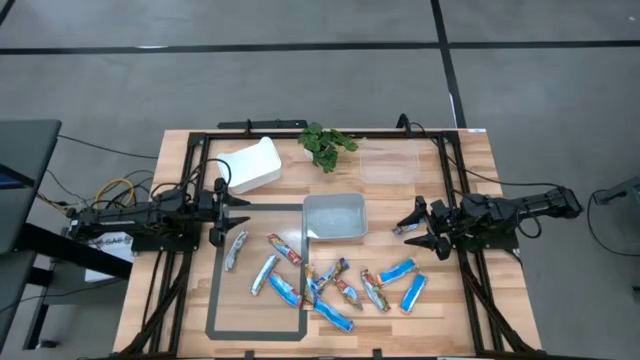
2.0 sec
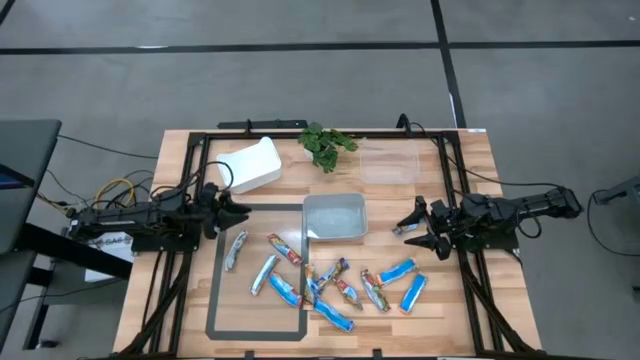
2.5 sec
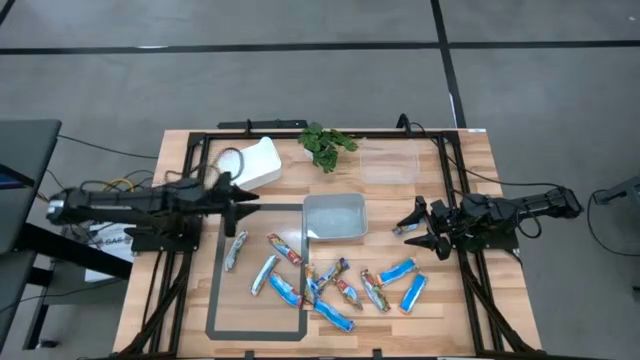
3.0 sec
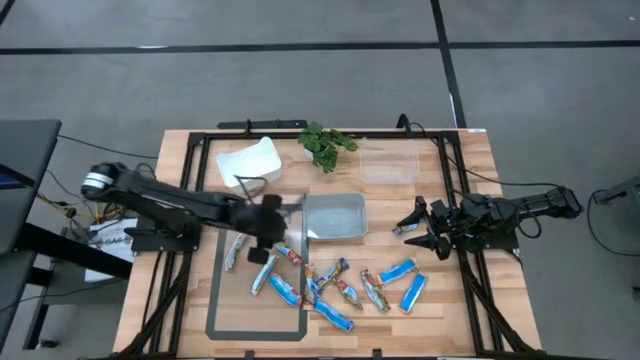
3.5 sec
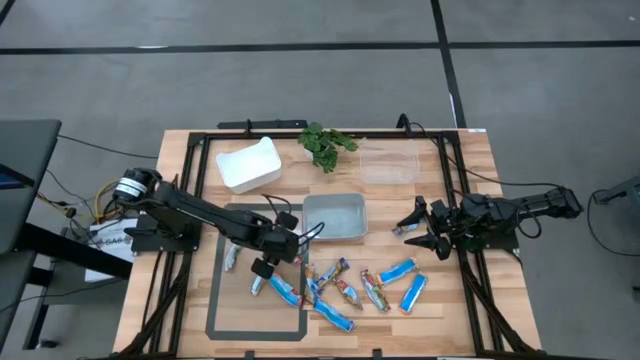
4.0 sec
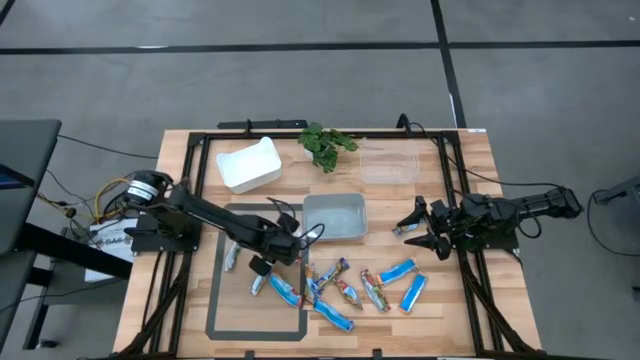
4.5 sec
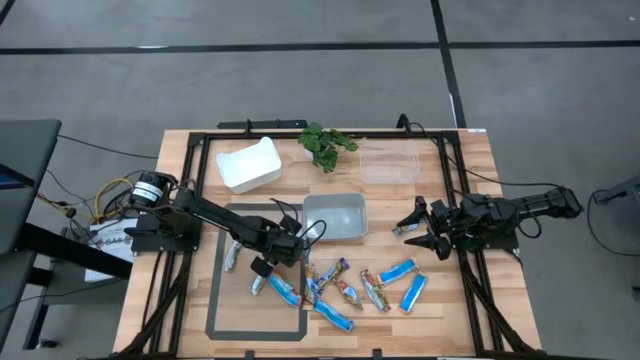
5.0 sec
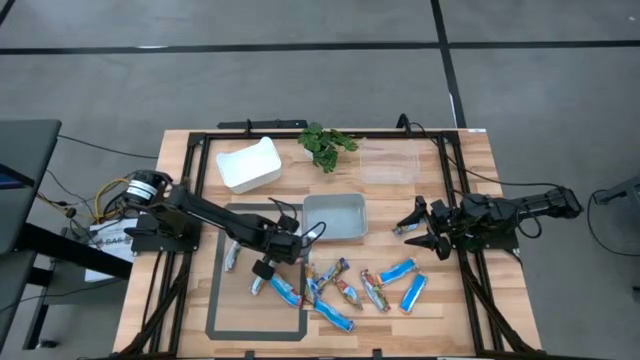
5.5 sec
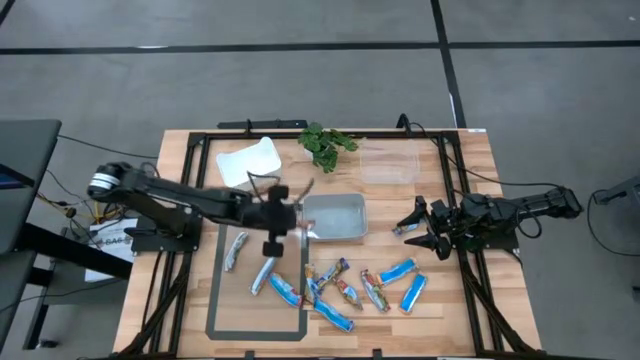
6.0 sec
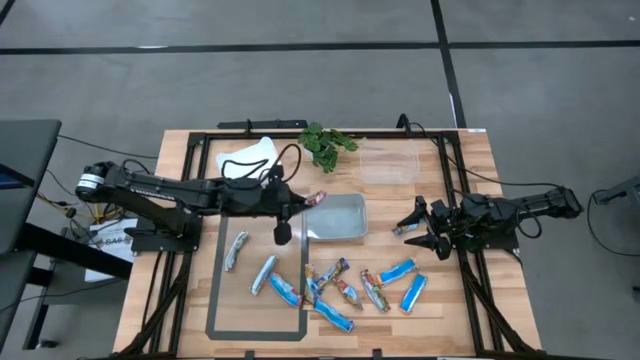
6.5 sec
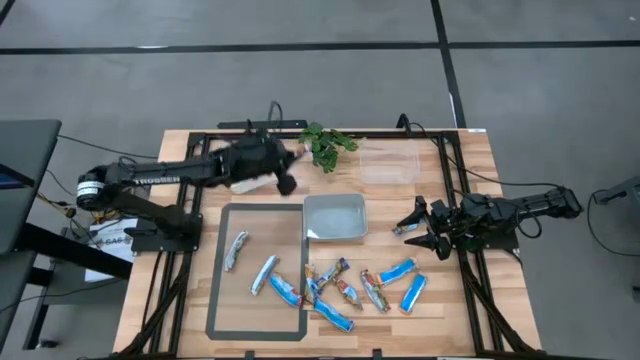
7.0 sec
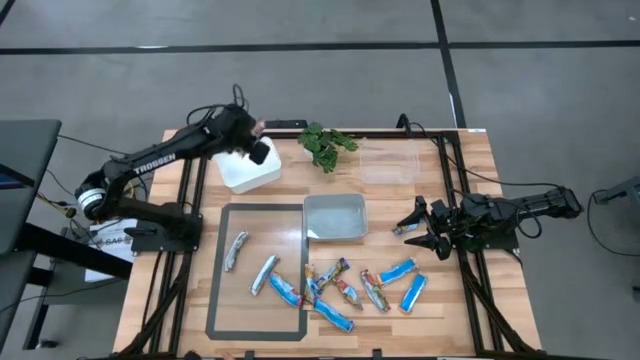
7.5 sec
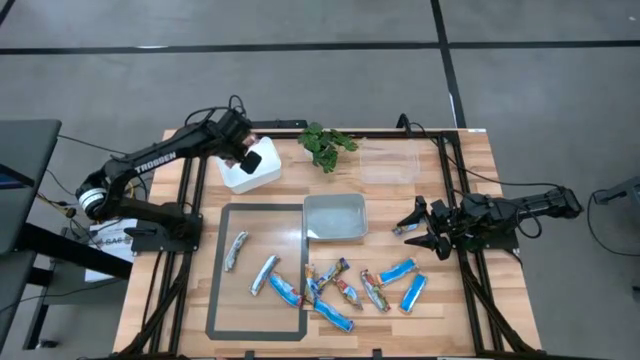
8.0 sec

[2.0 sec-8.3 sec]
Task: Pick and place Granola Bars by type
Put the red granola bar into the white bin

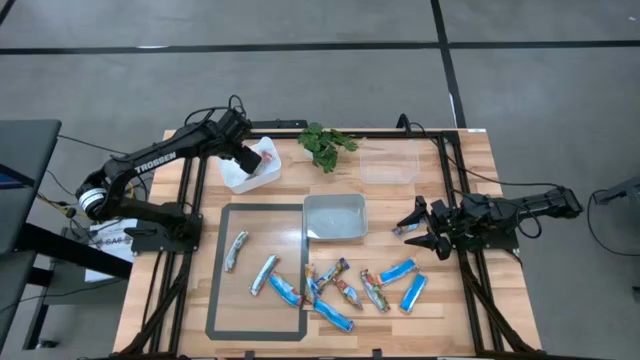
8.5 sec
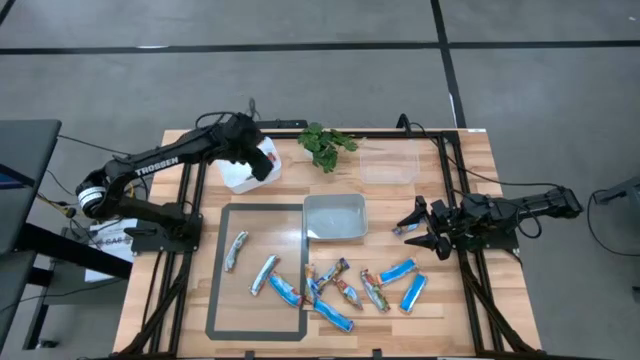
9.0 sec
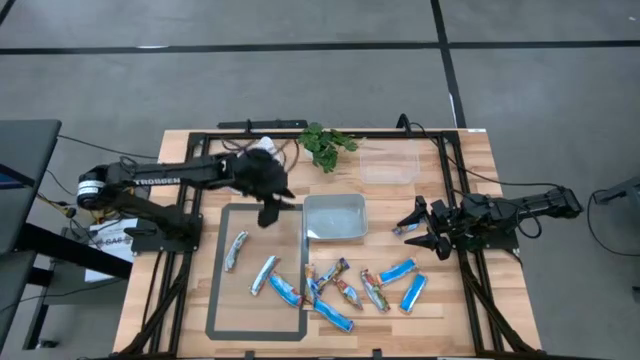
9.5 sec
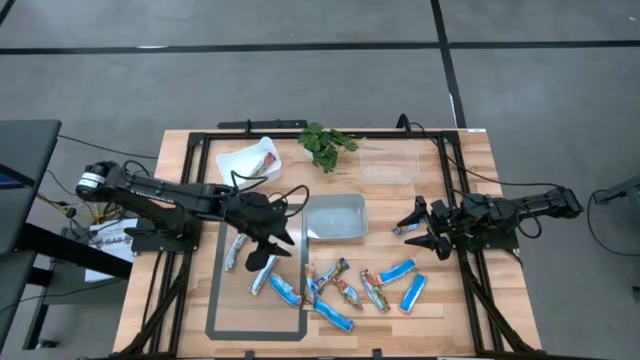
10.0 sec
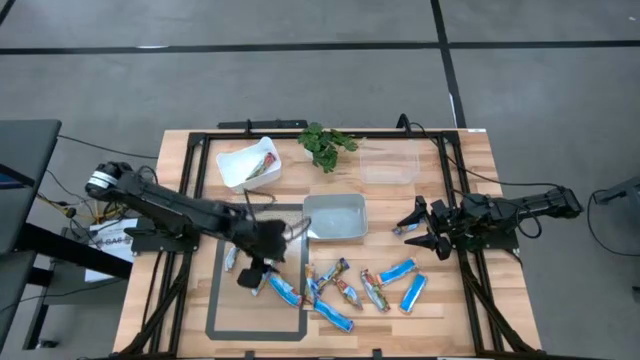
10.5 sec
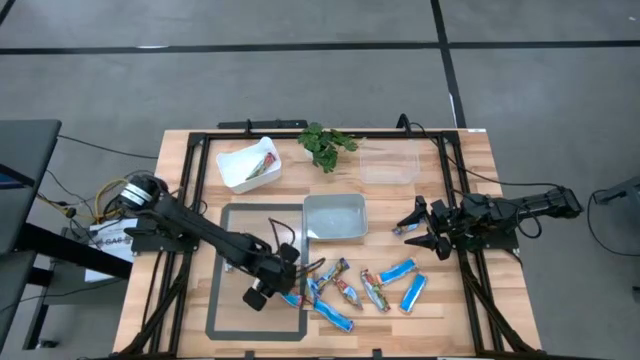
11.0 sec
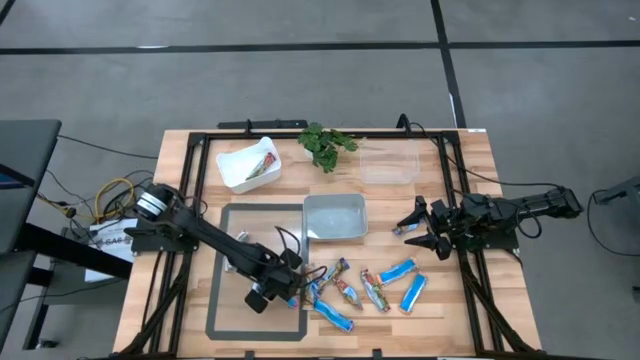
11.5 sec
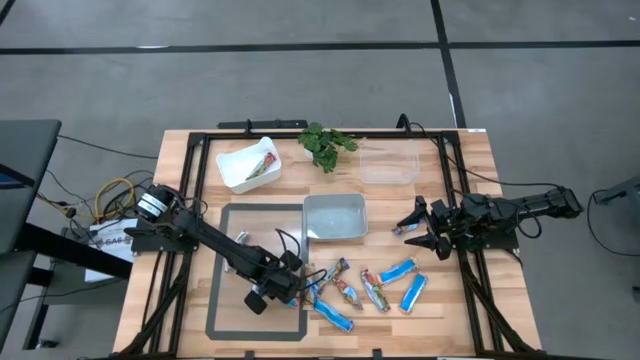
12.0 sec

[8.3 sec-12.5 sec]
Put the red granola bar into the white bin

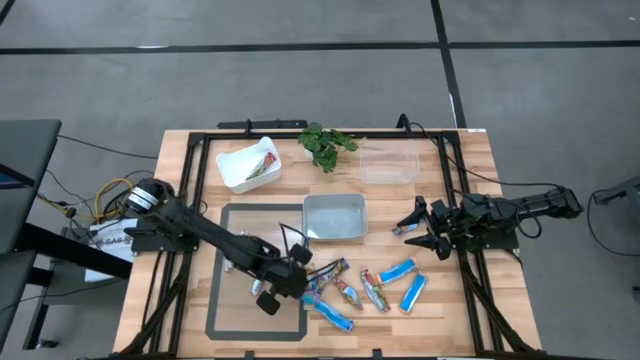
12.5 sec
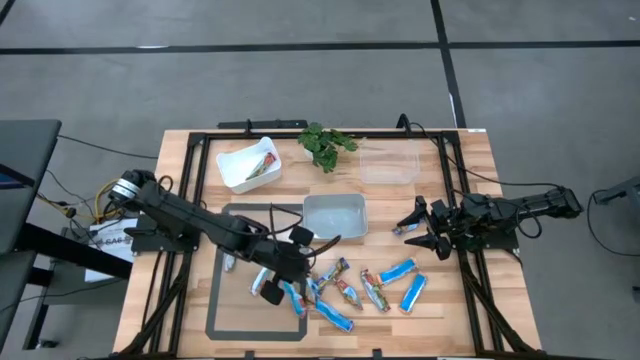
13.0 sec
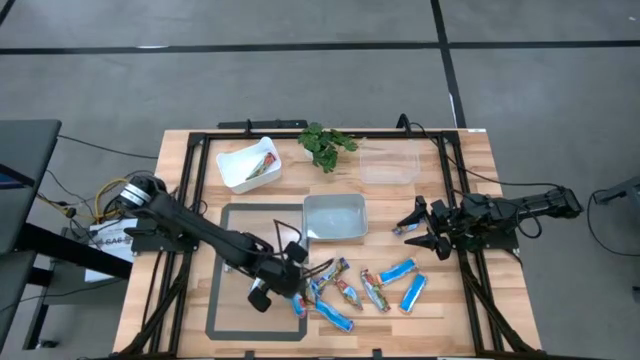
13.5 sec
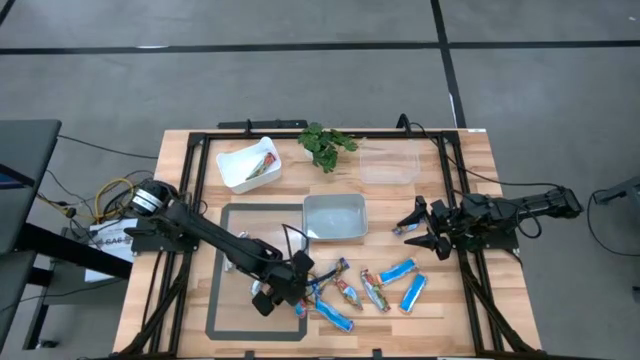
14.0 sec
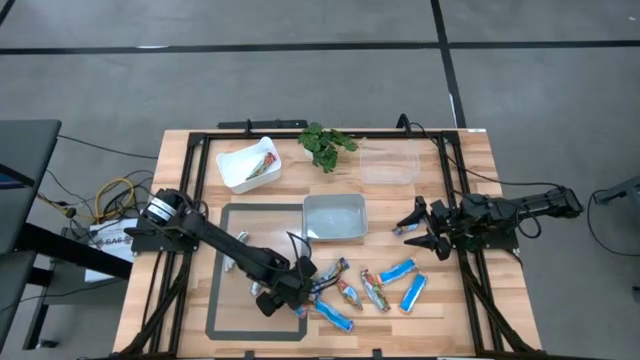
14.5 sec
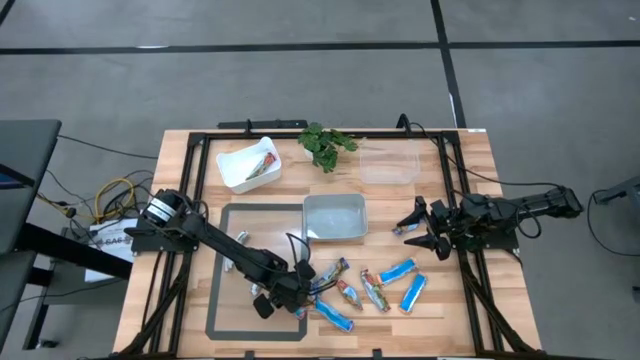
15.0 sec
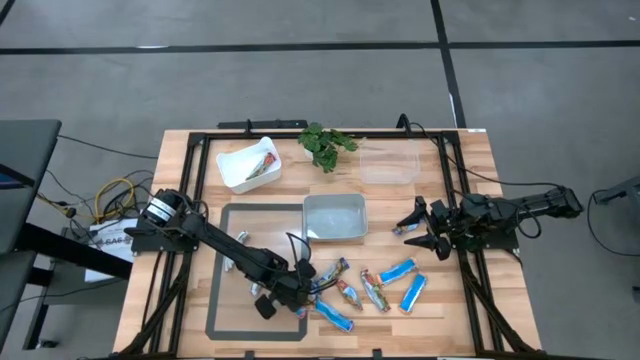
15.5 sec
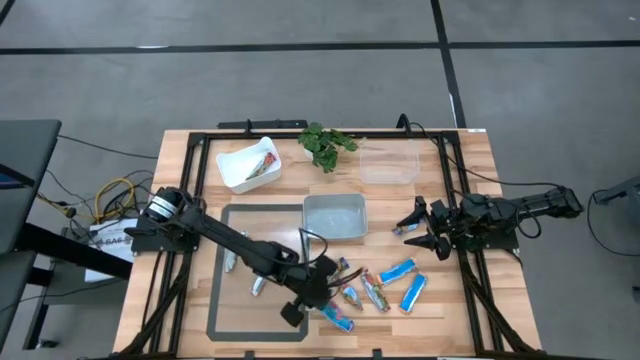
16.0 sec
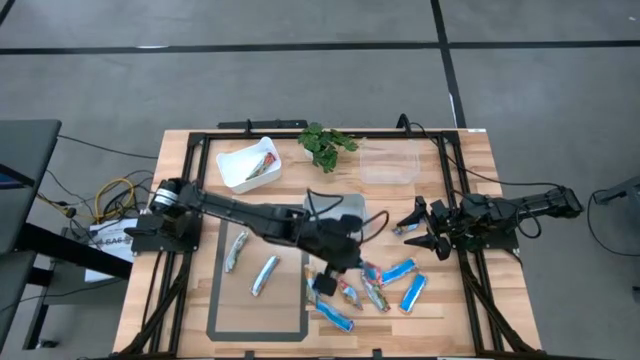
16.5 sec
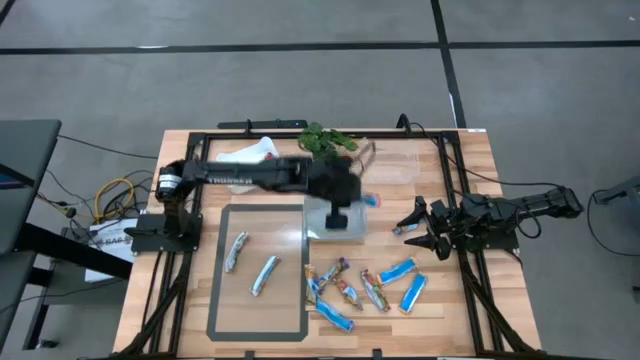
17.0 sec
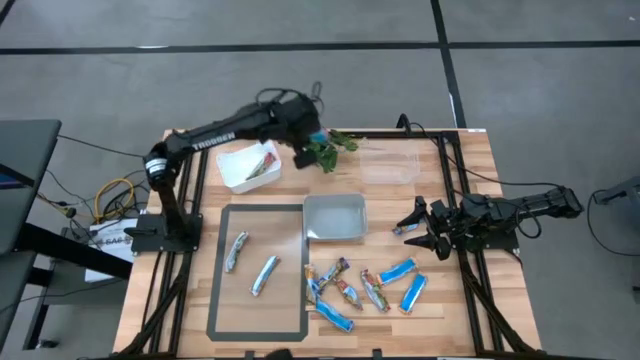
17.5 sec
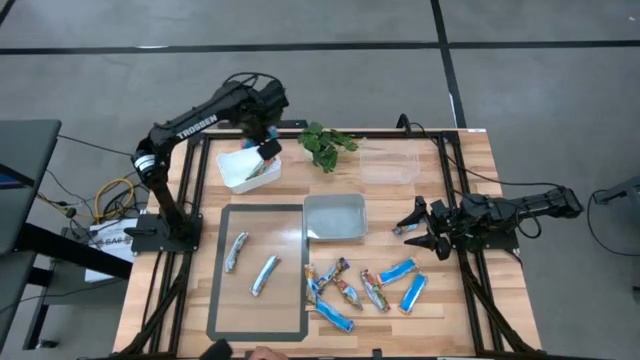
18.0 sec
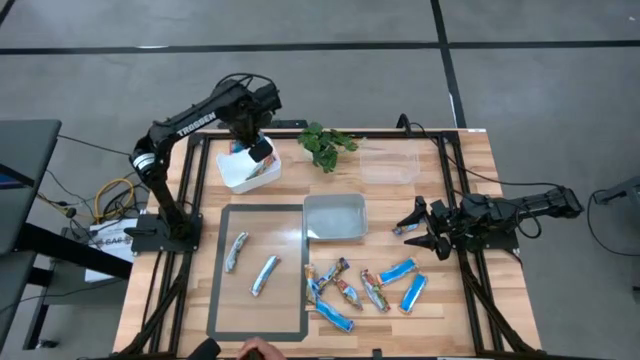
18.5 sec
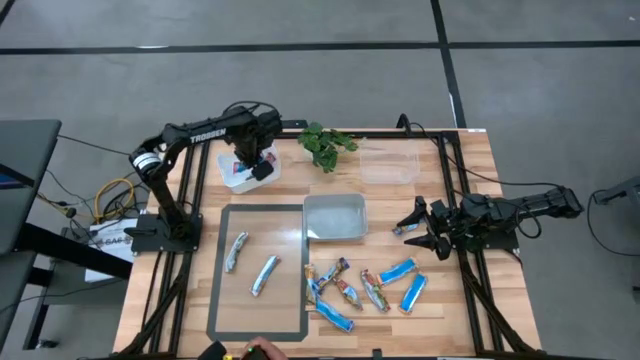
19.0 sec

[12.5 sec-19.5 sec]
Put the red granola bar into the white bin

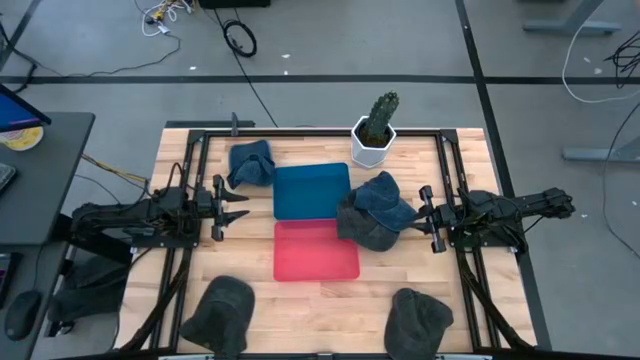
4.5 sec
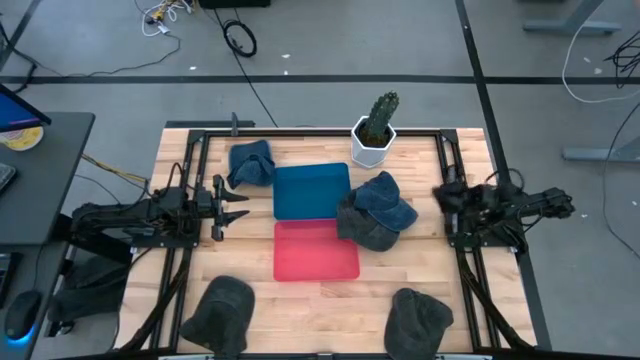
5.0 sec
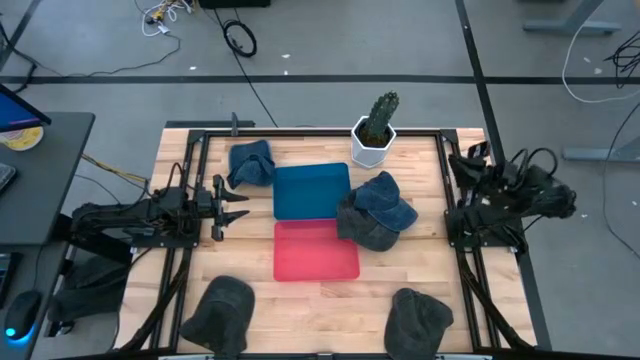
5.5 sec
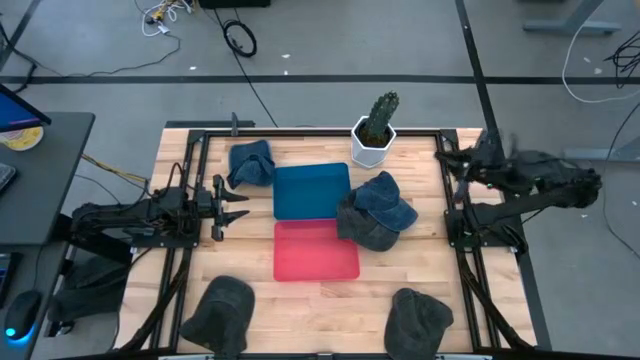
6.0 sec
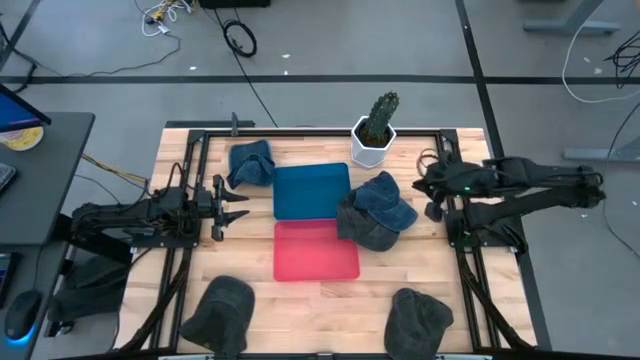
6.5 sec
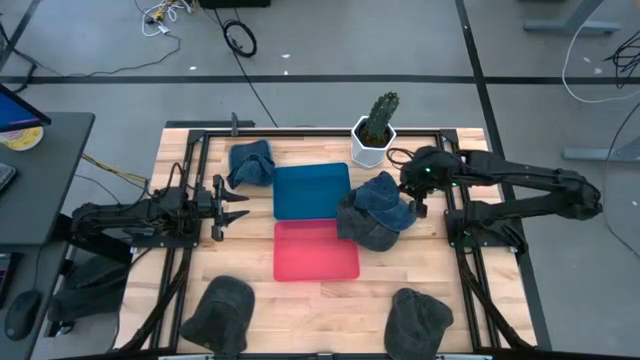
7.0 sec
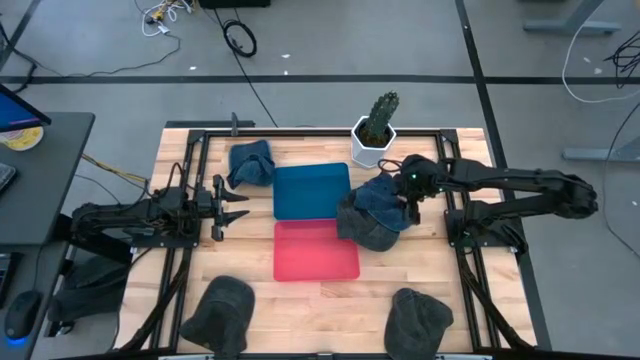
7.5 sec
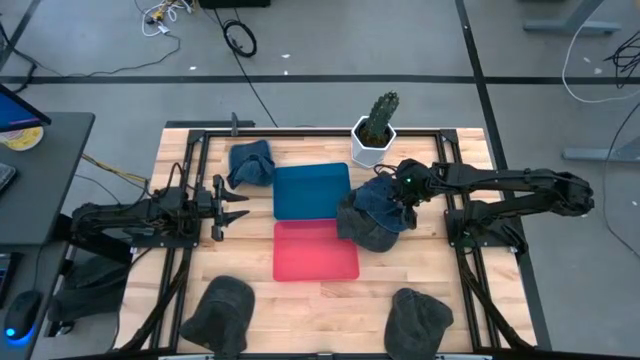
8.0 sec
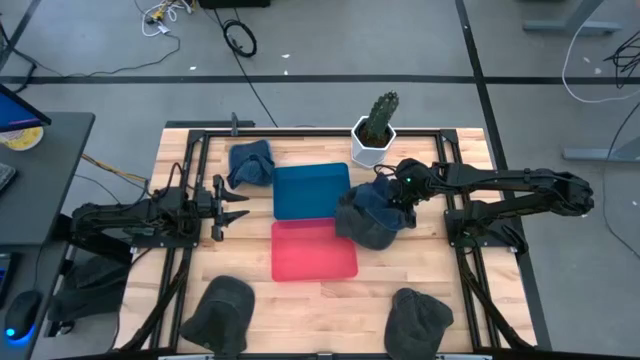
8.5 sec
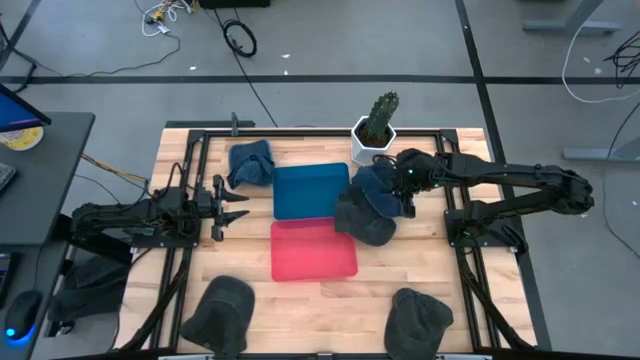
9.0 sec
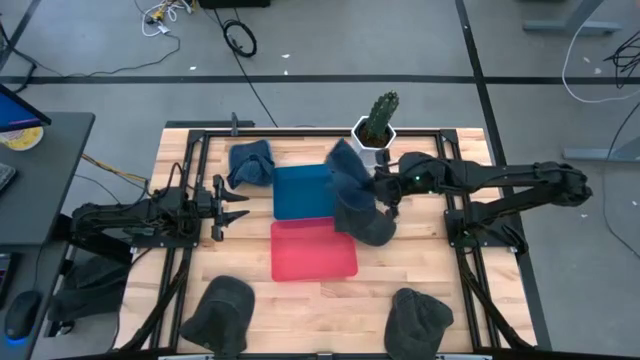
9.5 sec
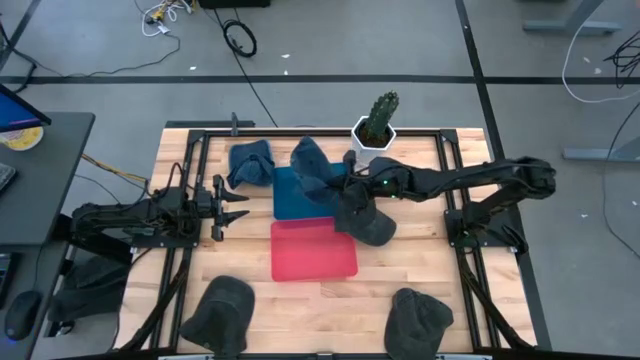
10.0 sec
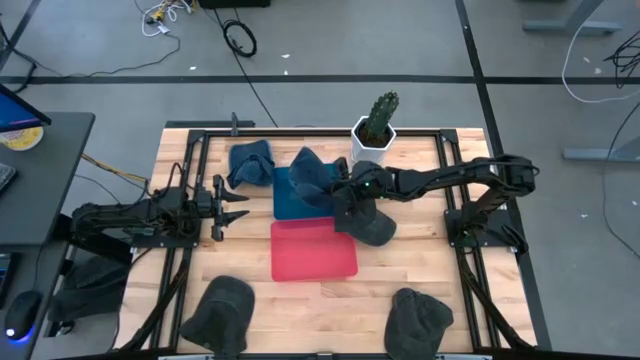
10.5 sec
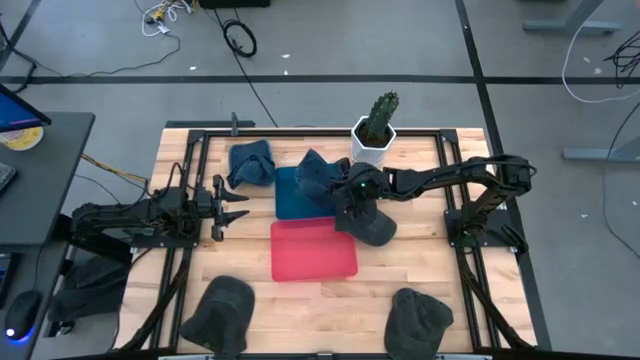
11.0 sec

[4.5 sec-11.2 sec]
Task: Pick & Place hat
Put the bottom blue cap into the blue bin
